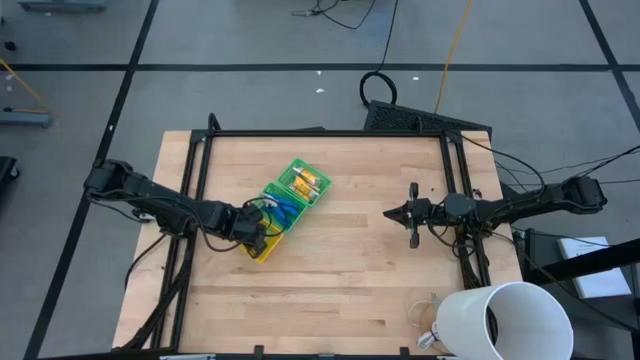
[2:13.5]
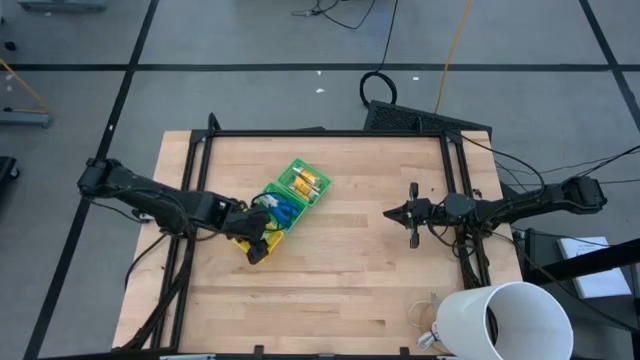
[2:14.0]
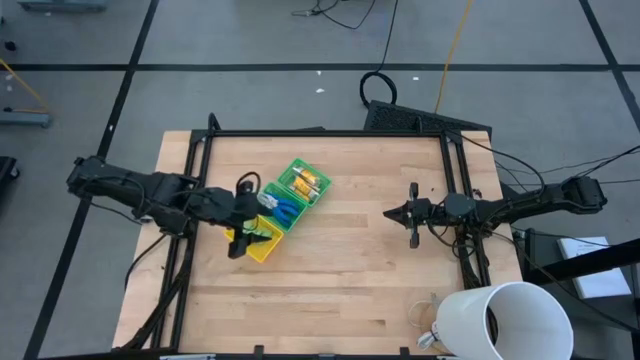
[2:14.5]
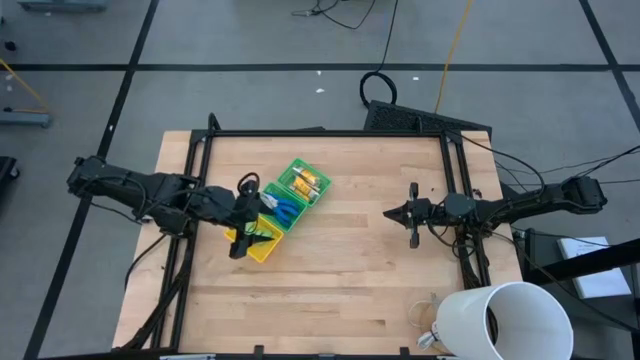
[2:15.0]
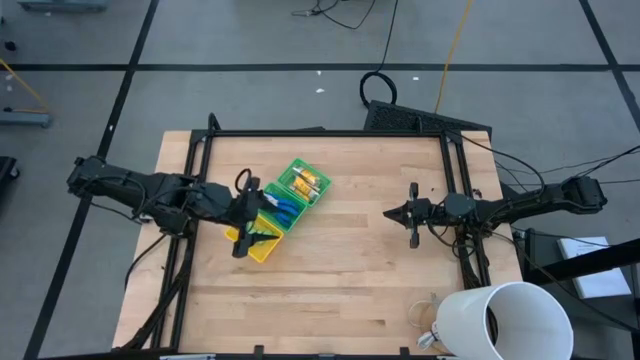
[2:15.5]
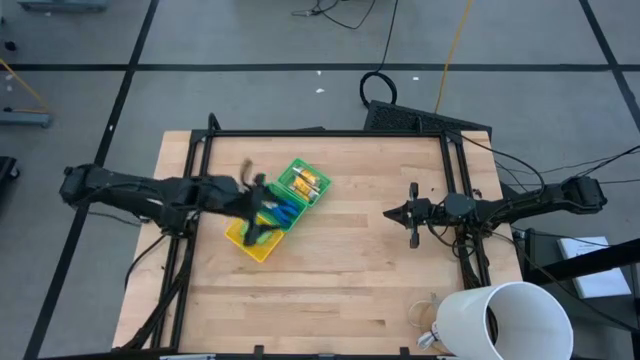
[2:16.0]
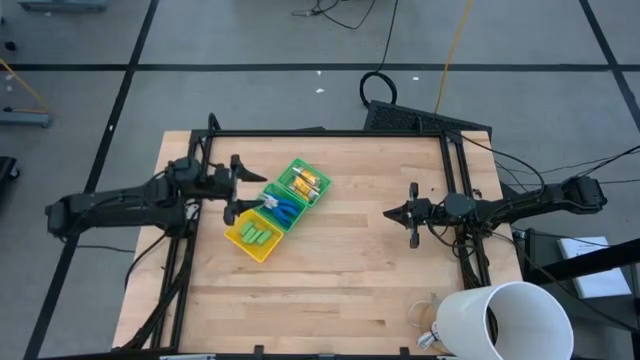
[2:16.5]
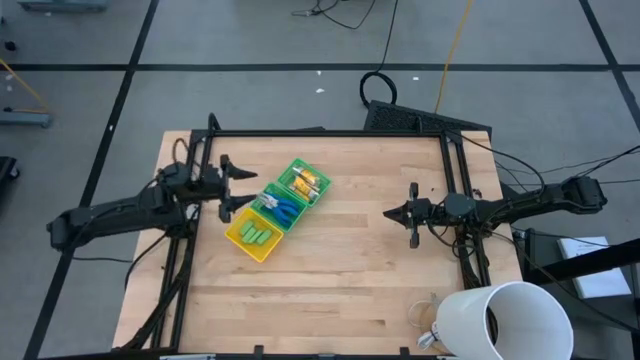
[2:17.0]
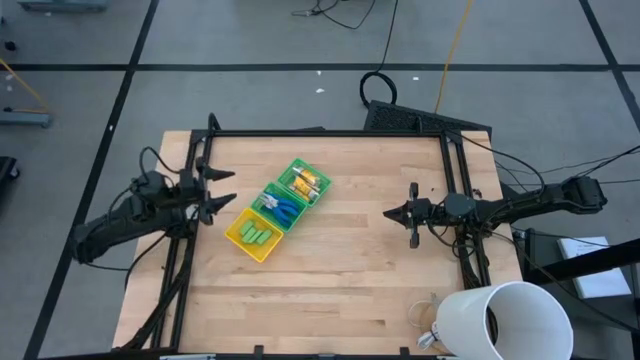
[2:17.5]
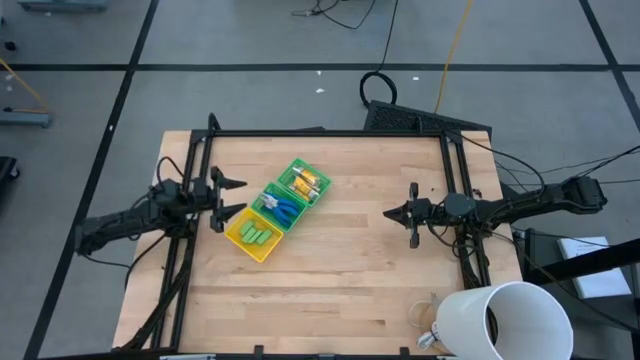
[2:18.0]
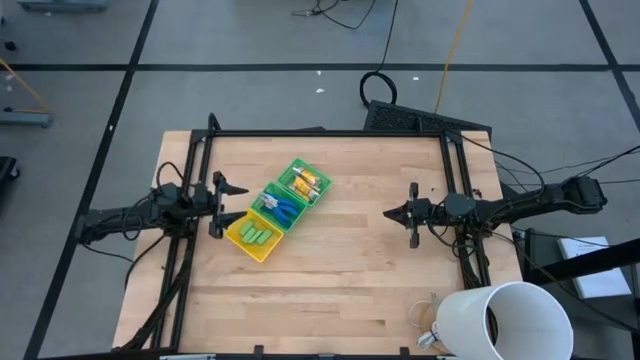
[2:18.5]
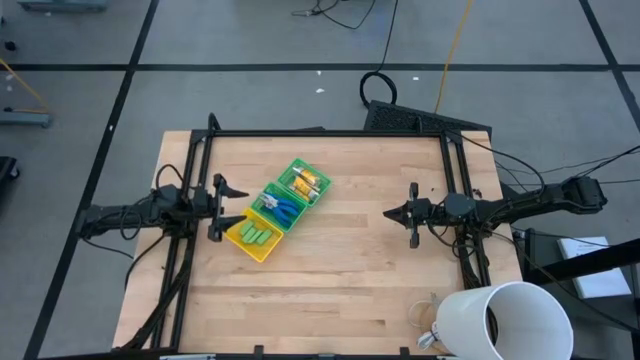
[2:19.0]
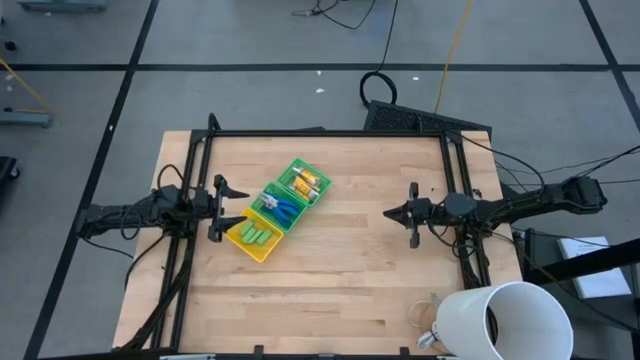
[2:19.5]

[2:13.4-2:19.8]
Task: Pick & Place School Supplies
Return to home position

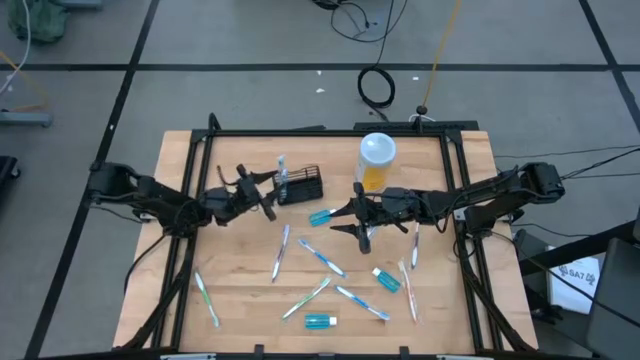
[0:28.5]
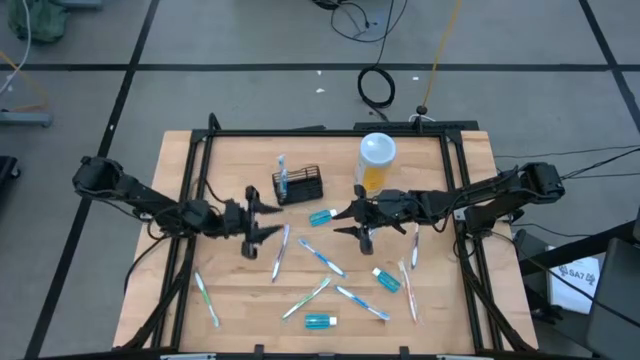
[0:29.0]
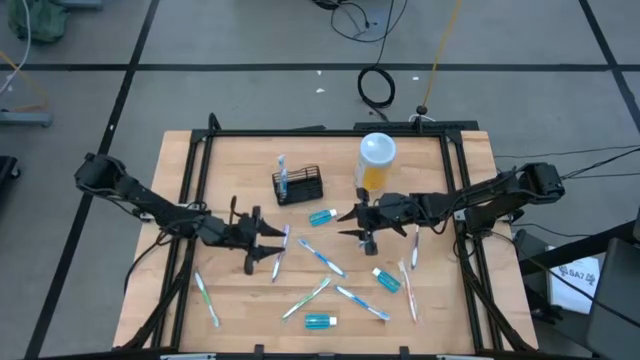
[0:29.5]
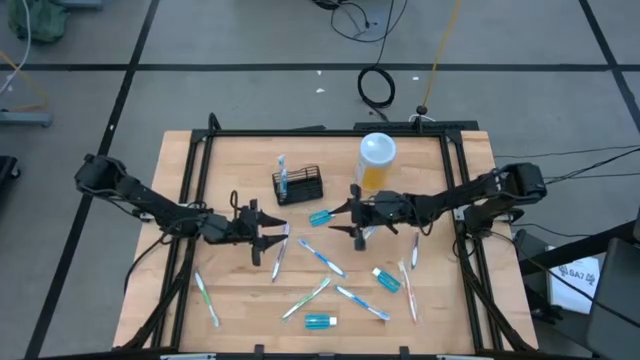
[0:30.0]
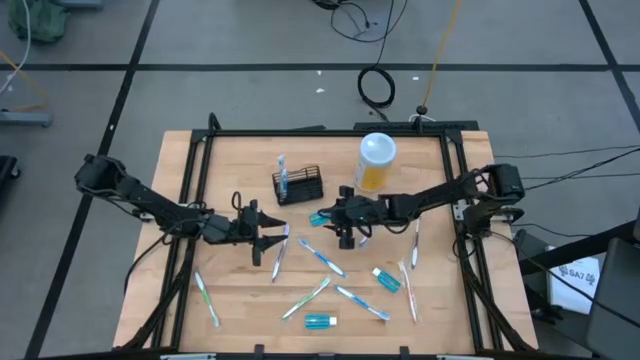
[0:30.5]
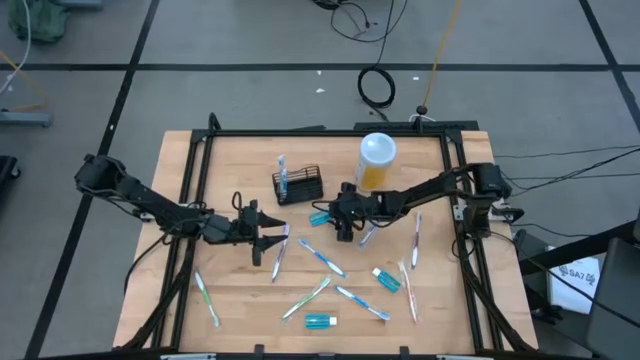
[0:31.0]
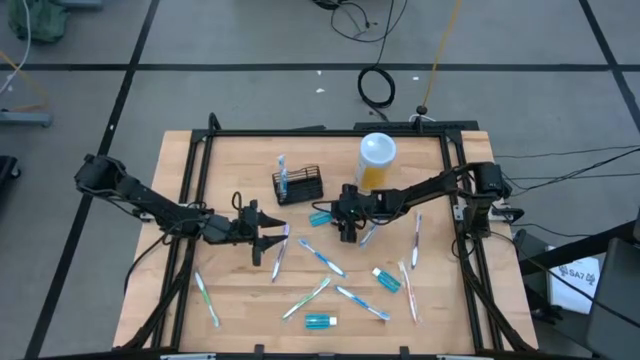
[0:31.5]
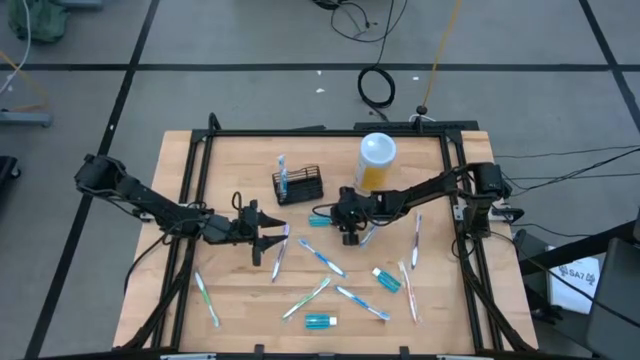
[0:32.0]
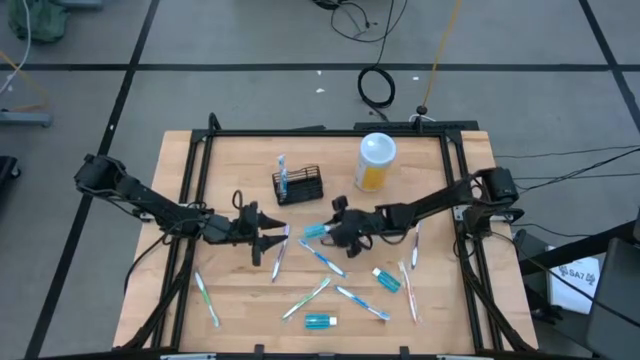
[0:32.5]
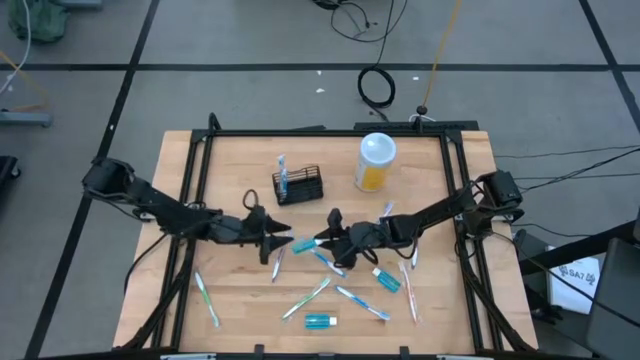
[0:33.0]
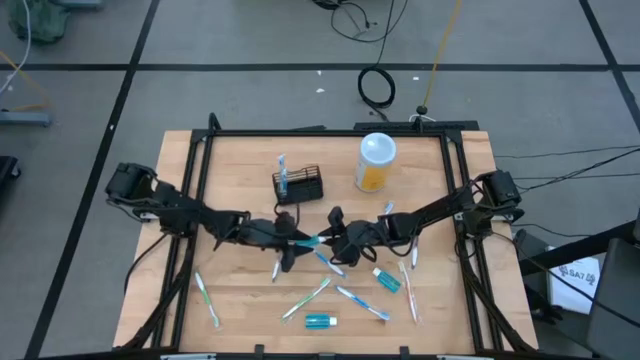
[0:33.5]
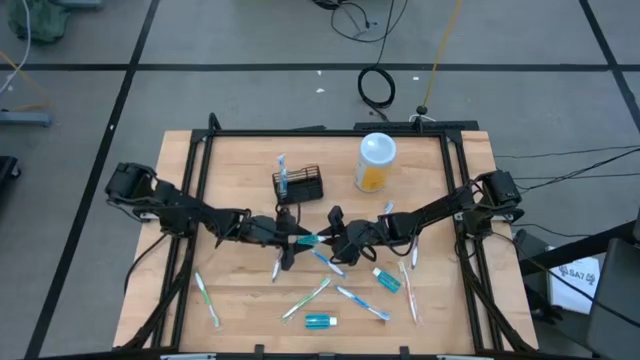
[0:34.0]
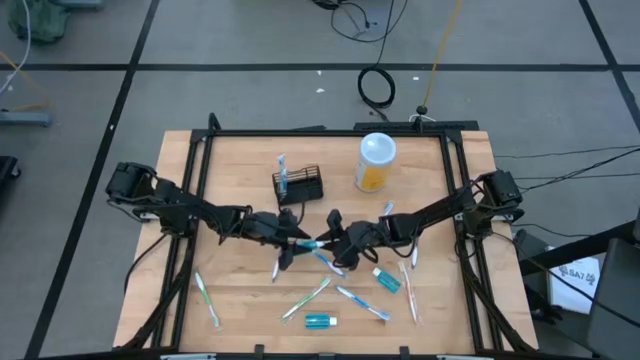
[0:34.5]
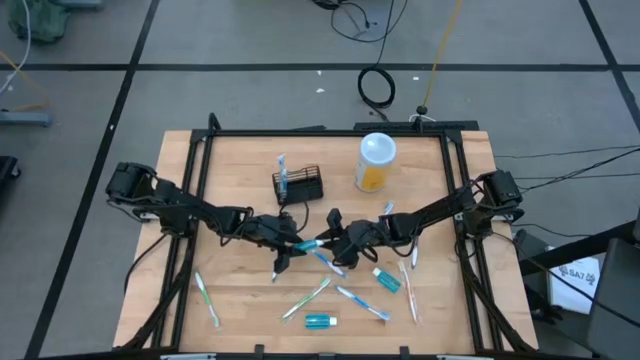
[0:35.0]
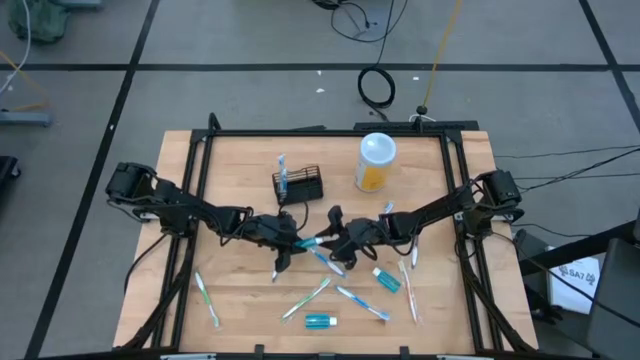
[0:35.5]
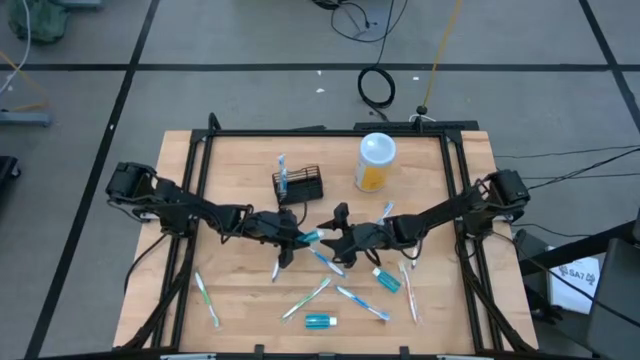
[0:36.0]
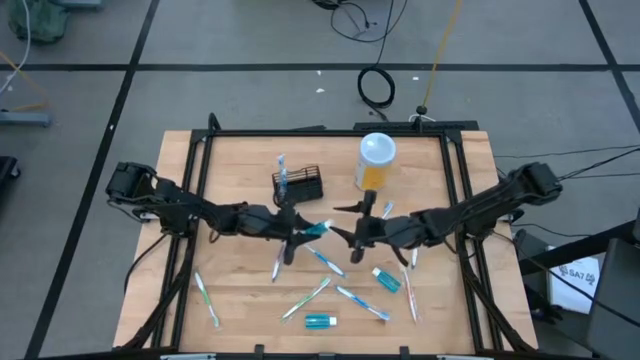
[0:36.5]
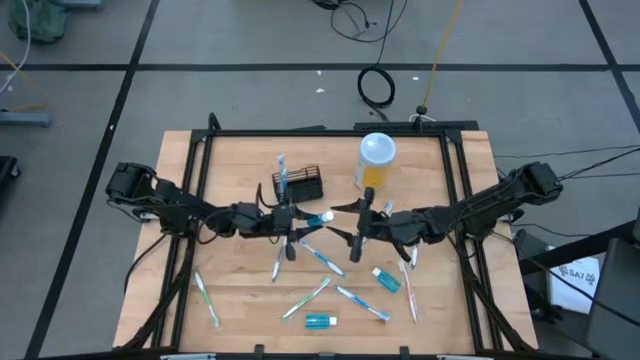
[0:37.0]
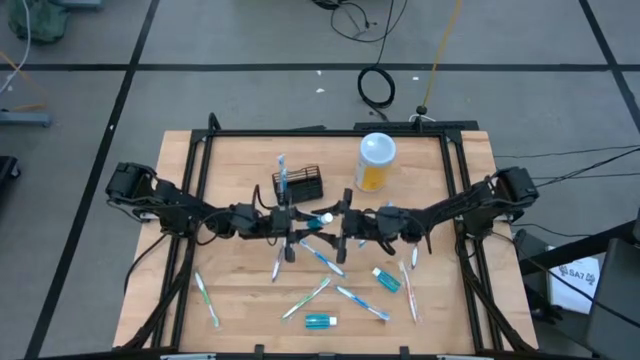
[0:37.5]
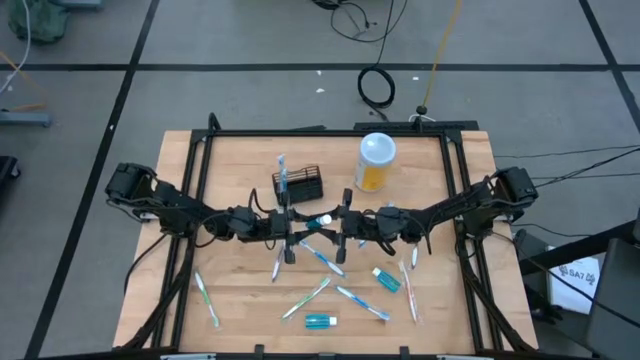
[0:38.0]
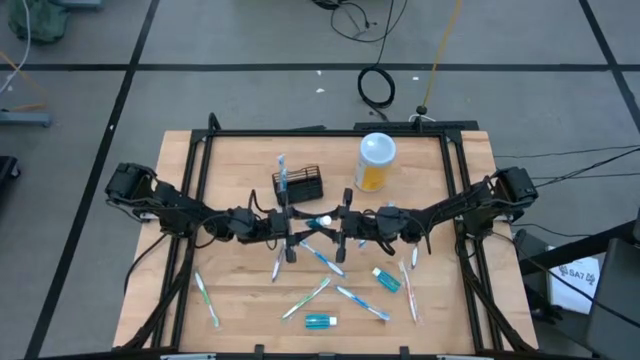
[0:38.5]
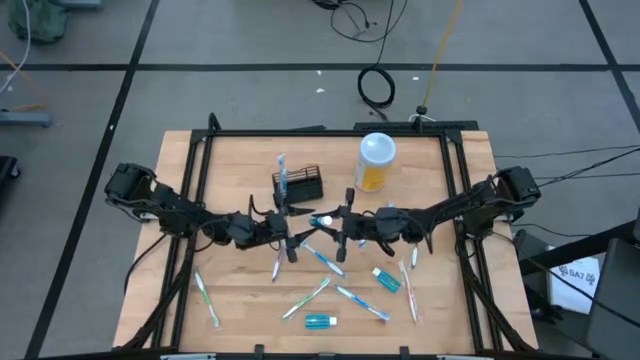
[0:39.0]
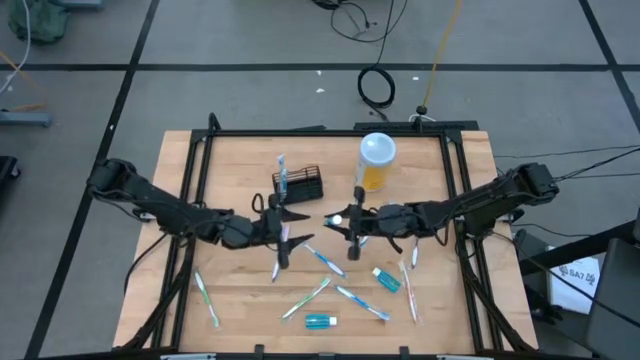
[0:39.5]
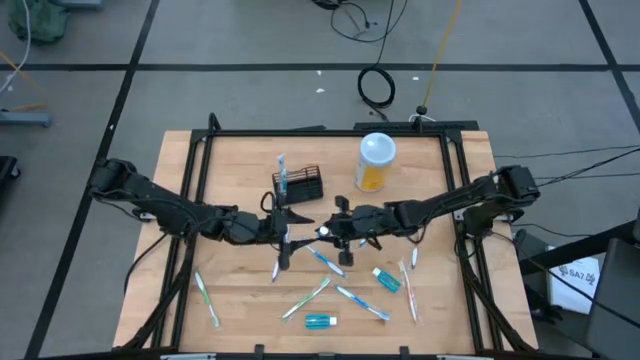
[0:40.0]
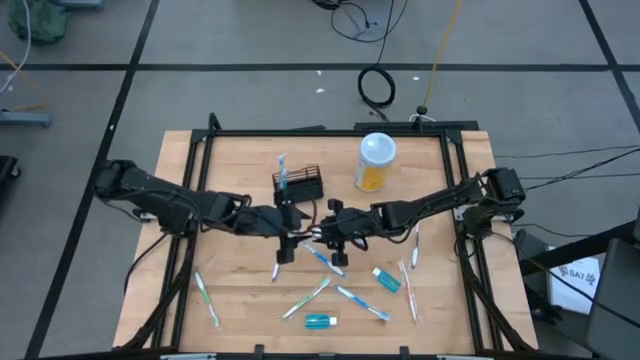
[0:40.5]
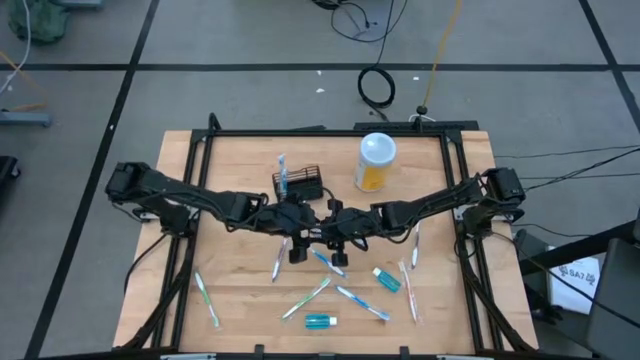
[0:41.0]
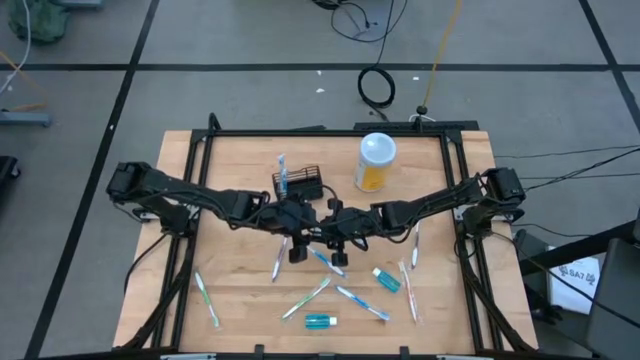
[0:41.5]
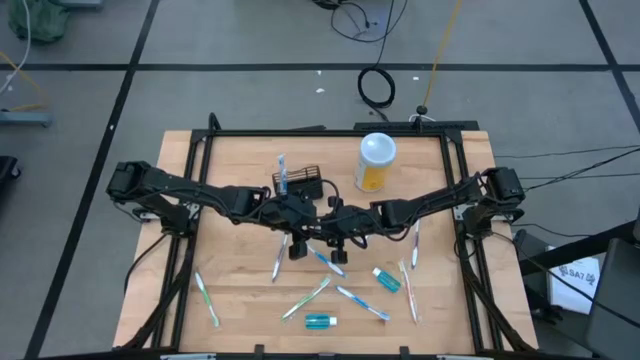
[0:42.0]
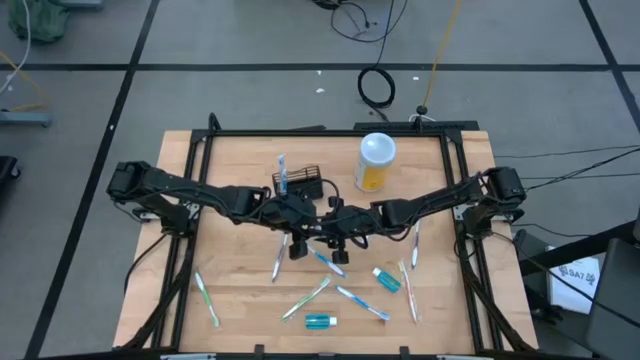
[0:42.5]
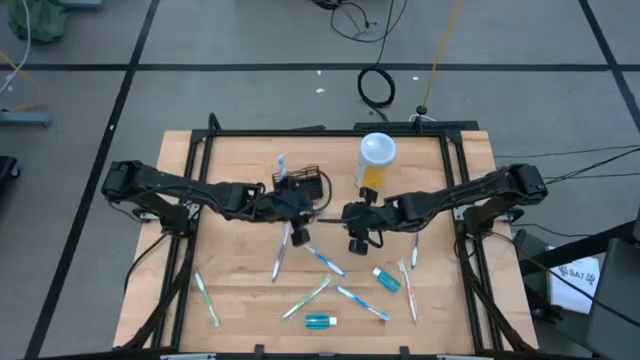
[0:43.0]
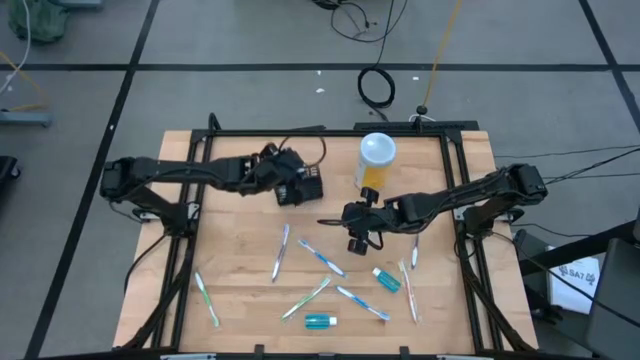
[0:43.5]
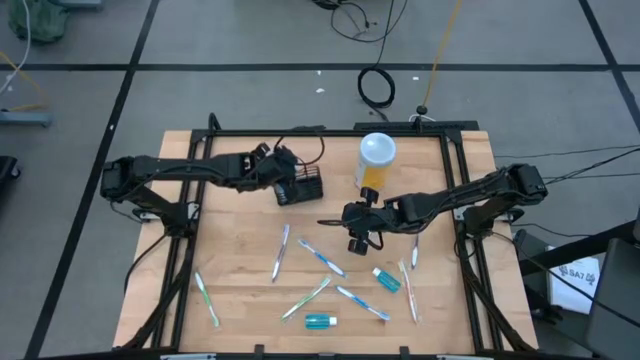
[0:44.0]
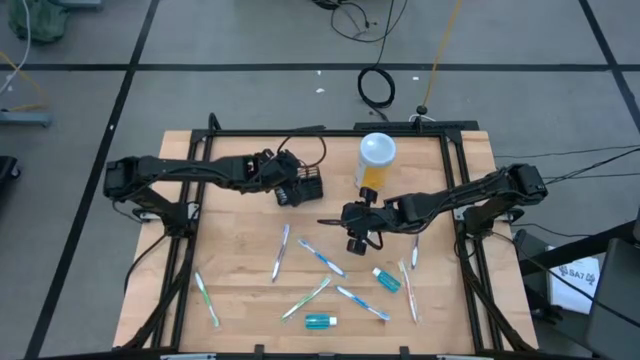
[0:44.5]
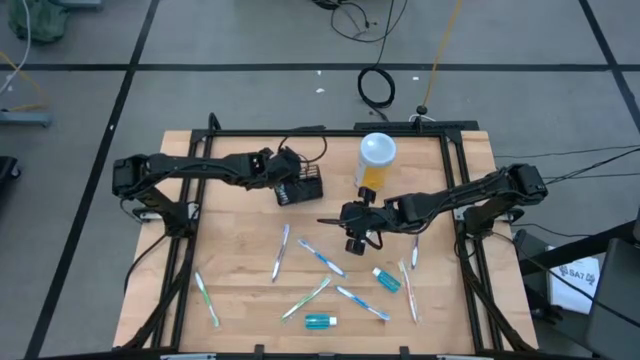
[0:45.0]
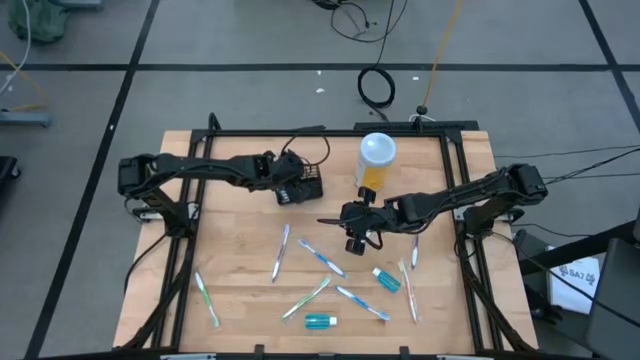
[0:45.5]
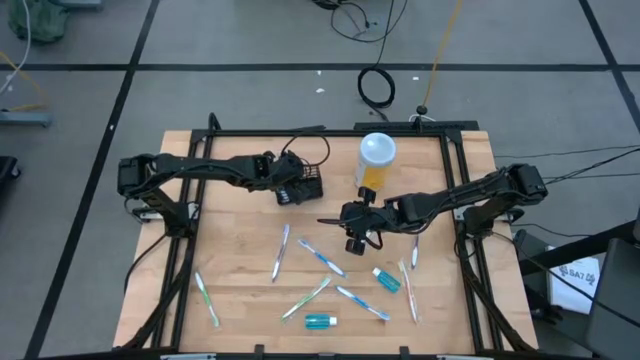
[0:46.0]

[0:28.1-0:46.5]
Task: Pick & Place toothbrushing station
Put the blue mouthwash into the black mesh organizer
